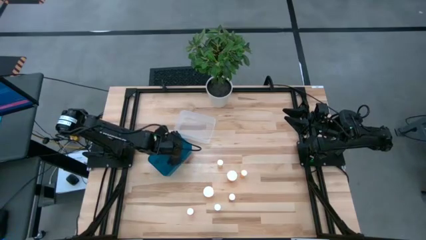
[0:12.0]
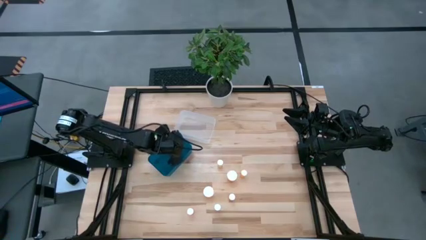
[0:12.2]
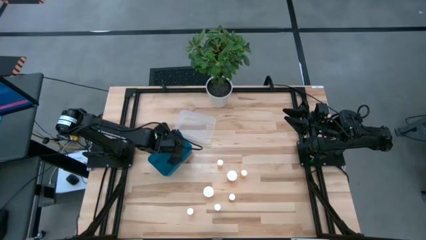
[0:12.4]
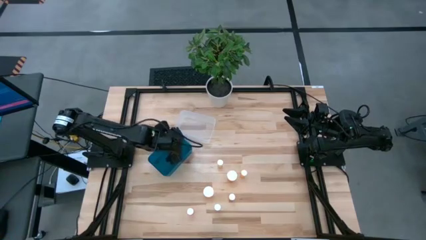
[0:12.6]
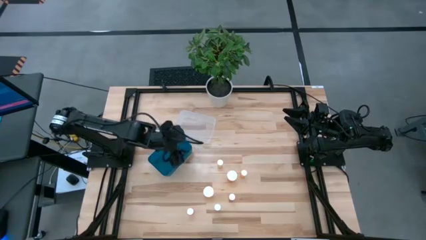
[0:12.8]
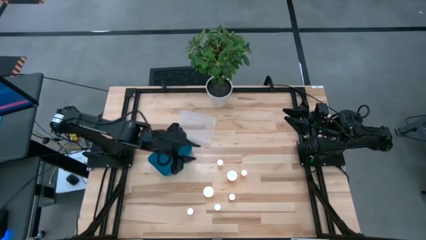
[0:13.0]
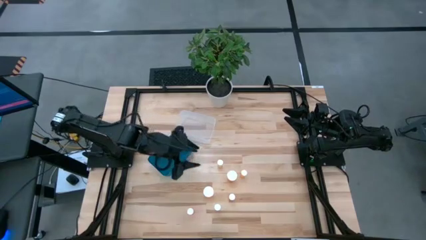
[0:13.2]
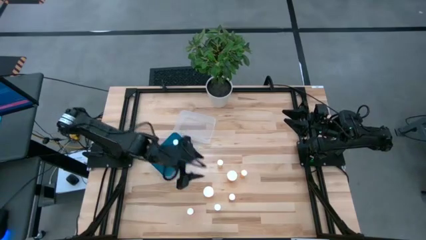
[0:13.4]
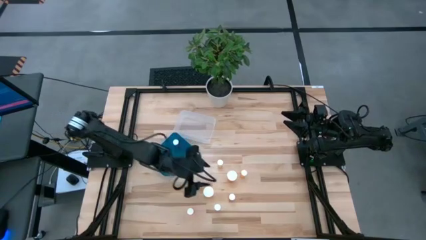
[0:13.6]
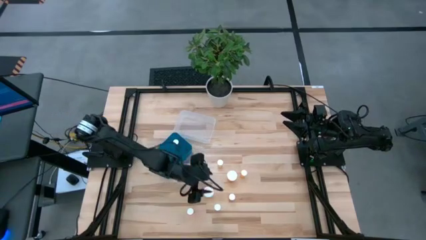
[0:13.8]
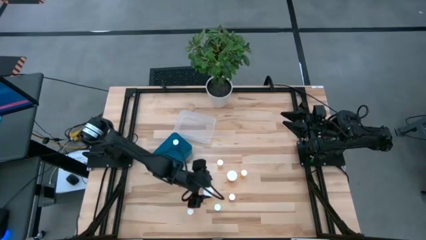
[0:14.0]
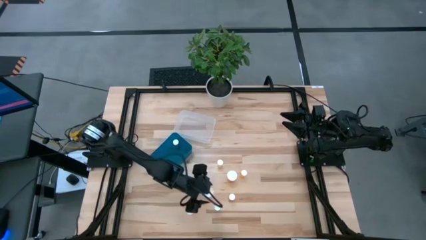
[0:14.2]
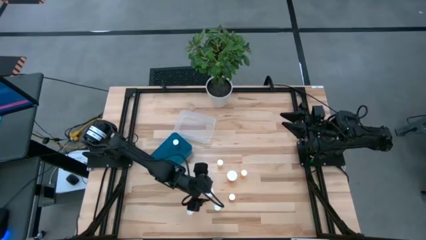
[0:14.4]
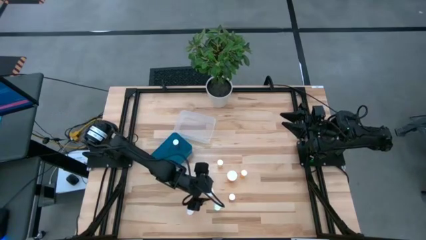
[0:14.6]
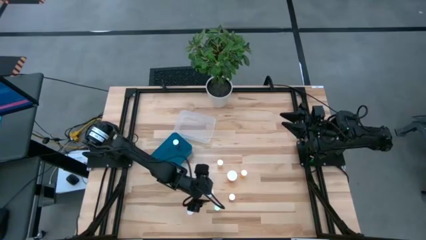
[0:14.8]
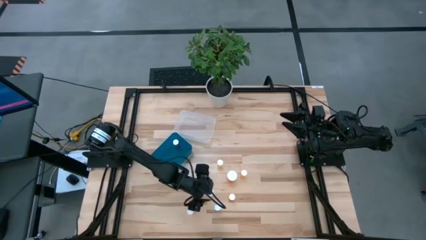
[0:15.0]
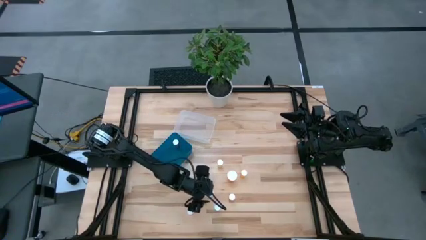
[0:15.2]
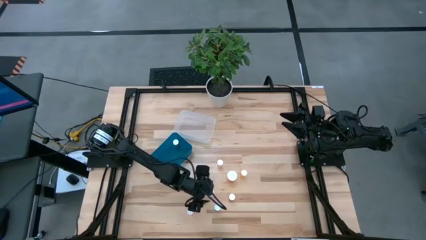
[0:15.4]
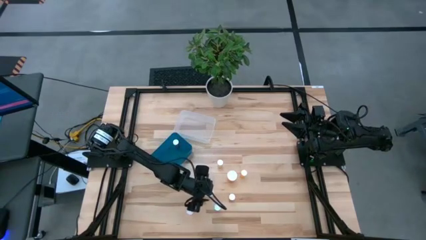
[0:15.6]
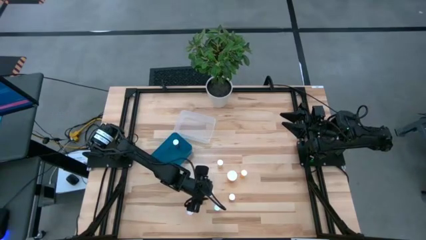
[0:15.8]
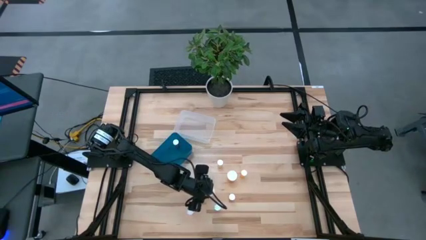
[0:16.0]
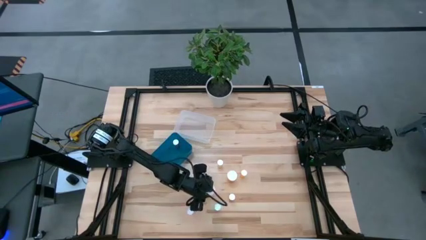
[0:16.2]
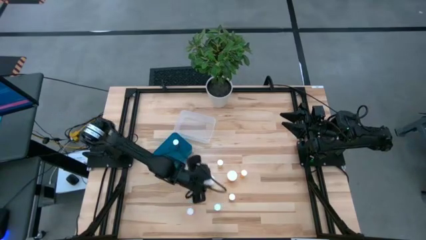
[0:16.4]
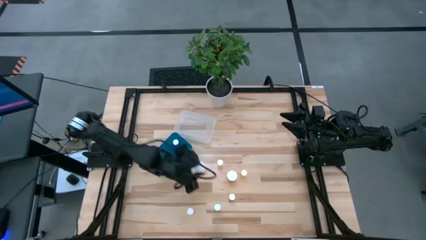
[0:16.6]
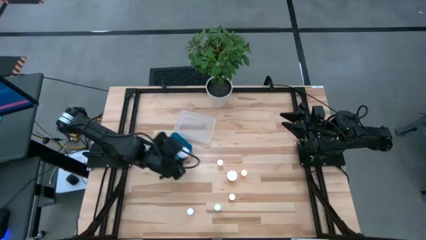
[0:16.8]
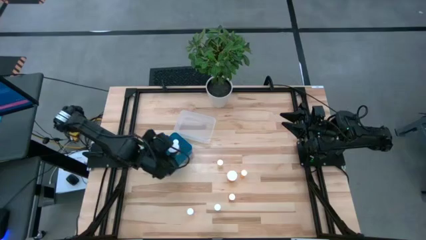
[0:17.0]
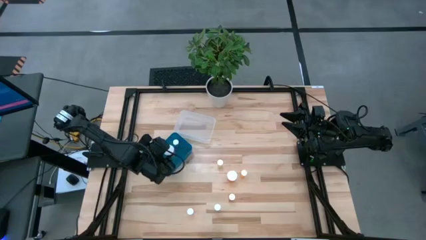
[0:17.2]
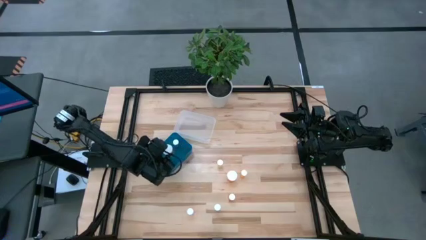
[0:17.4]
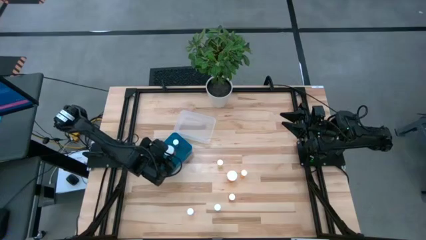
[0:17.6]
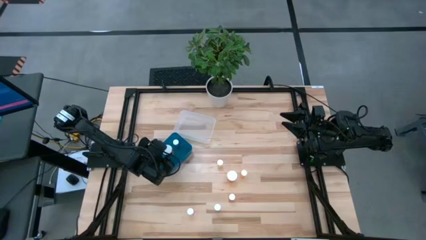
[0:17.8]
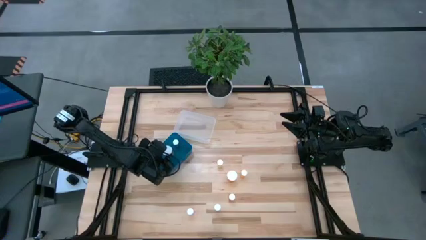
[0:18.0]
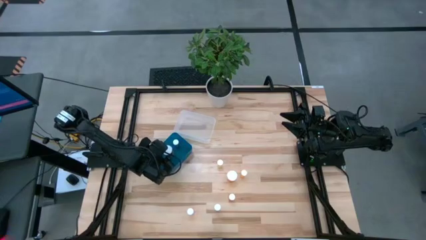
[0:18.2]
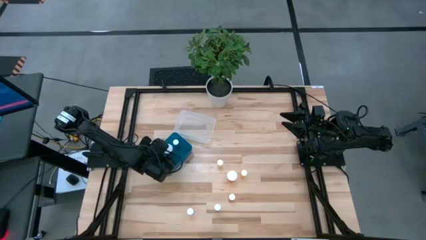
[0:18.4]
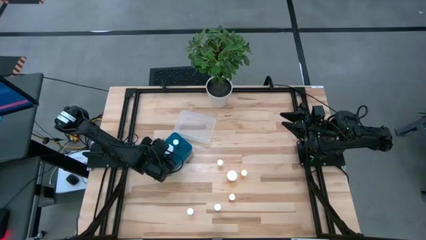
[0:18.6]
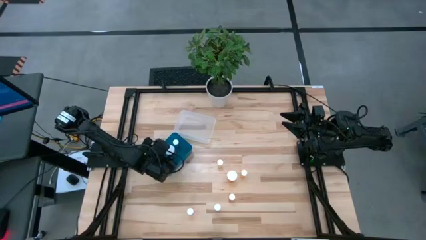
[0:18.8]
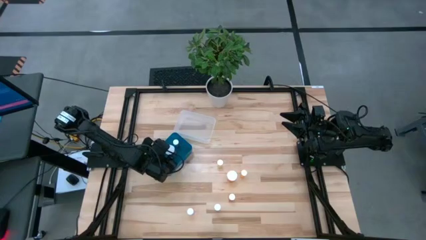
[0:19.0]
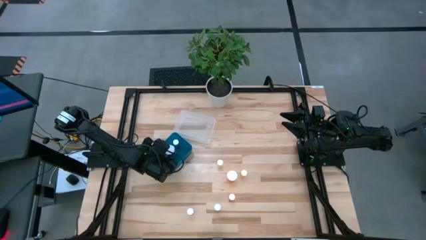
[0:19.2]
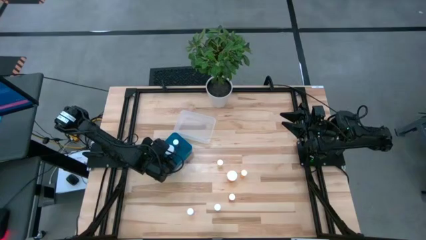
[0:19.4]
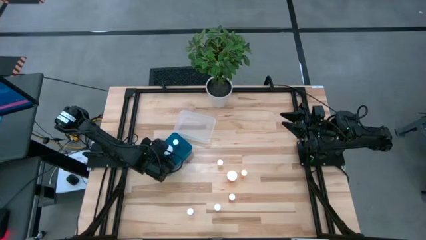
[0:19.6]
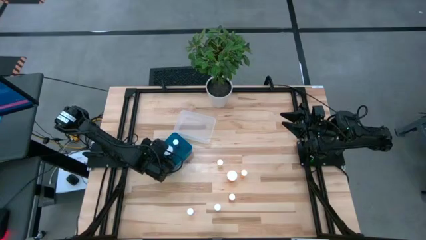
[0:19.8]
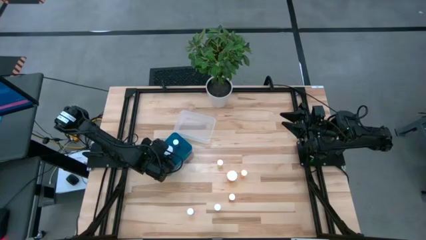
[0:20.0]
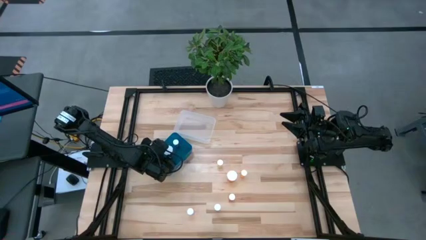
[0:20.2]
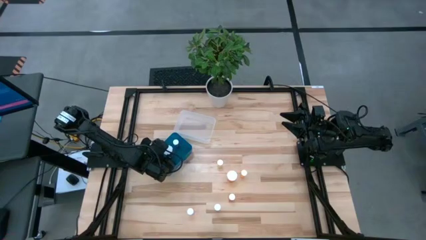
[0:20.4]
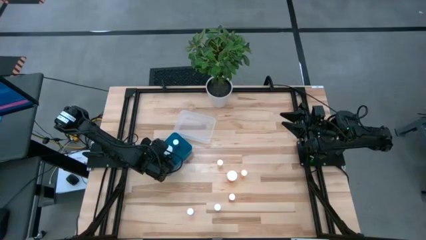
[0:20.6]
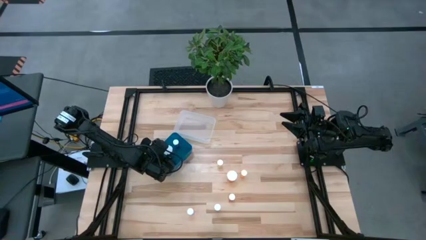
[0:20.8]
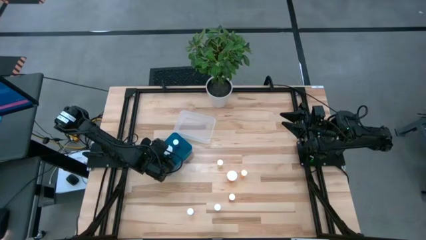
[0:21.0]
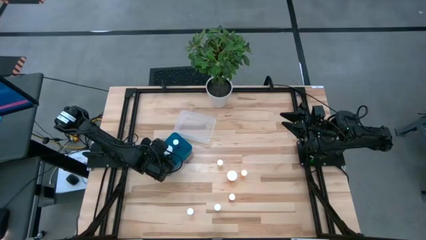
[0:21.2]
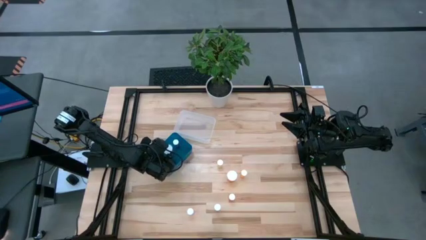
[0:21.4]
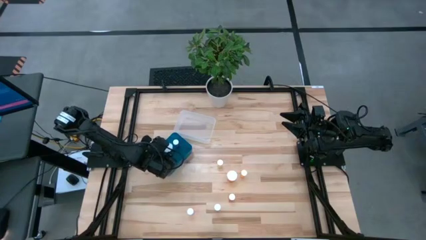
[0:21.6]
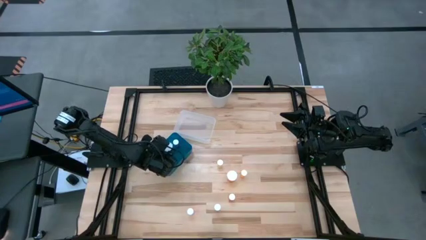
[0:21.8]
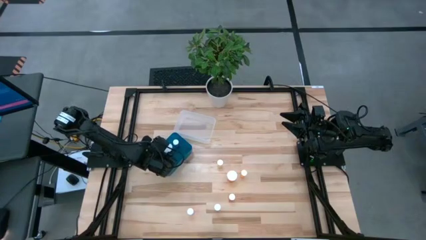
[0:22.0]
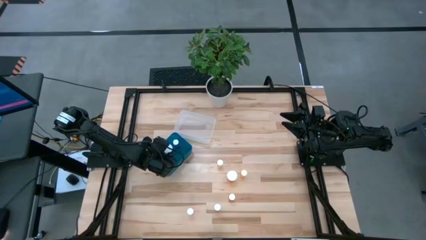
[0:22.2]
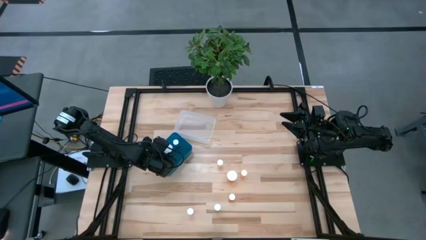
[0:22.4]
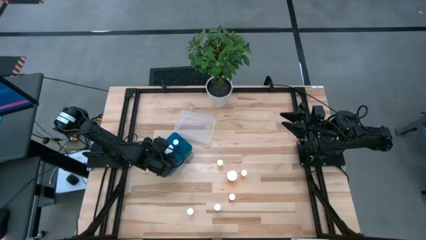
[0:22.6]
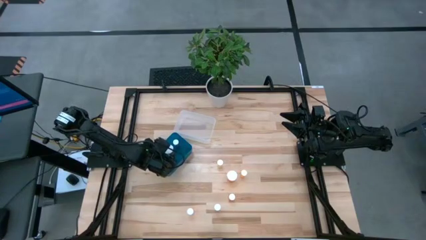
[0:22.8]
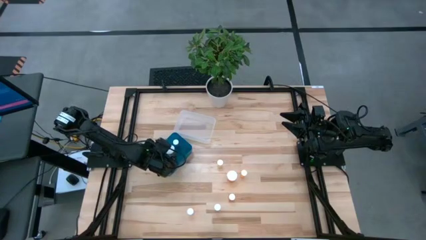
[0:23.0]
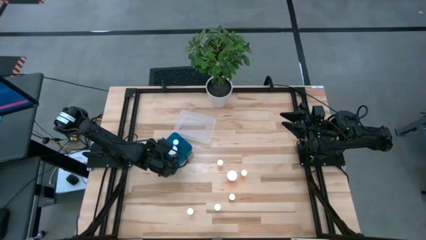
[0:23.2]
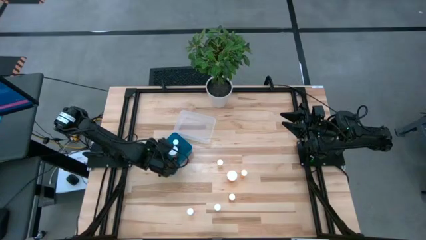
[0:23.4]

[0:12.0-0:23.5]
Task: Pick and place medicine bottles into bin by pill shape (circle, oval)
Put the orange pill bottle into the blue bin

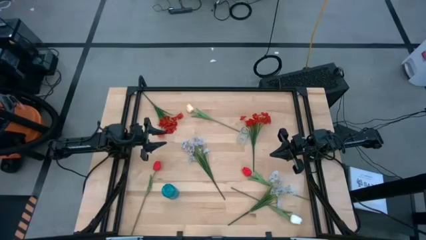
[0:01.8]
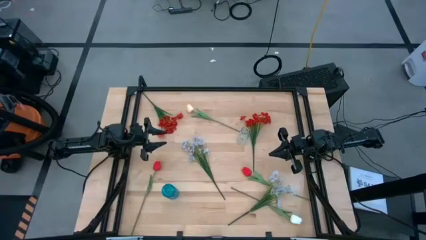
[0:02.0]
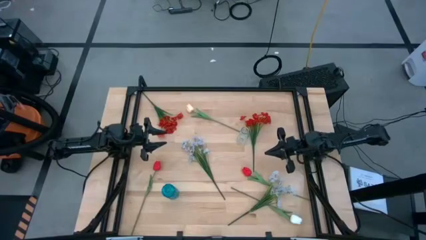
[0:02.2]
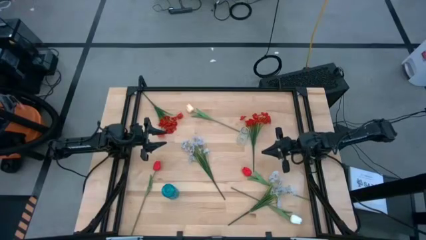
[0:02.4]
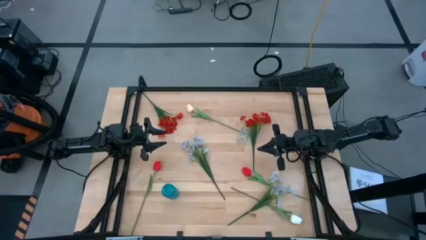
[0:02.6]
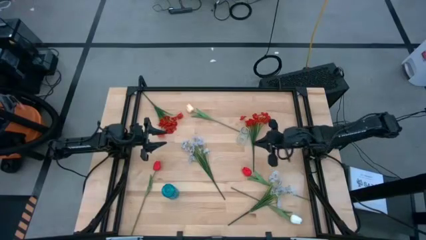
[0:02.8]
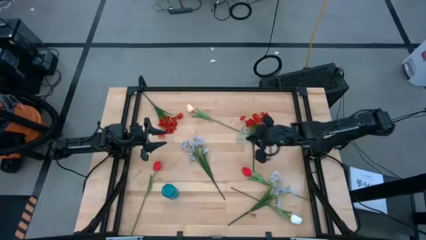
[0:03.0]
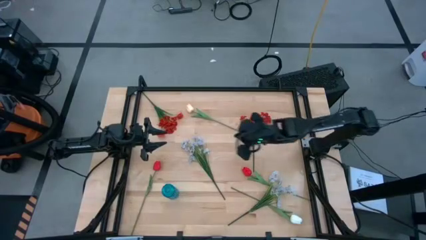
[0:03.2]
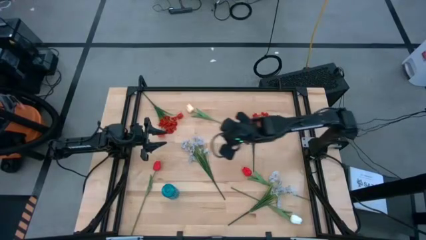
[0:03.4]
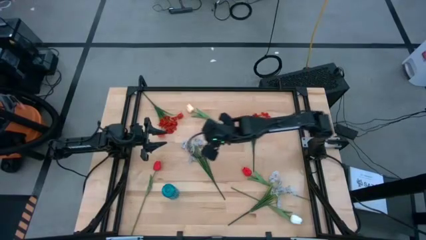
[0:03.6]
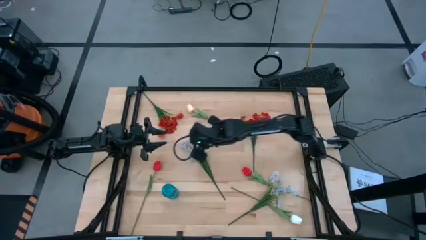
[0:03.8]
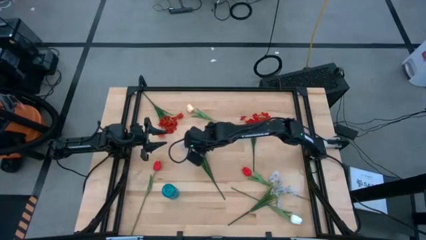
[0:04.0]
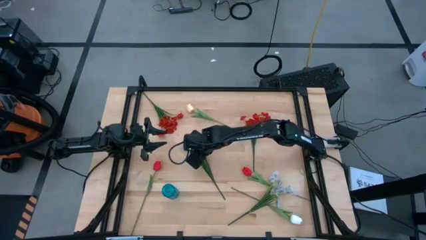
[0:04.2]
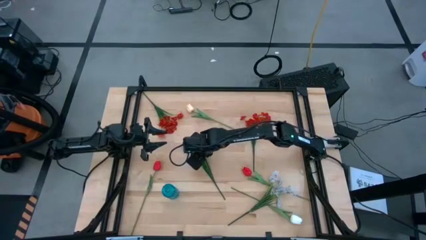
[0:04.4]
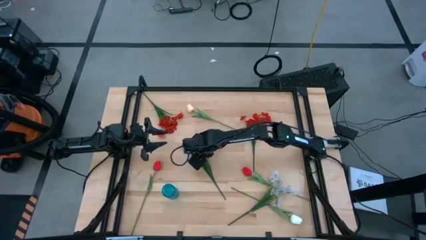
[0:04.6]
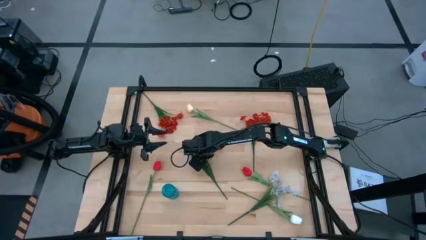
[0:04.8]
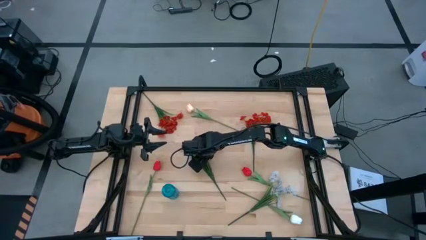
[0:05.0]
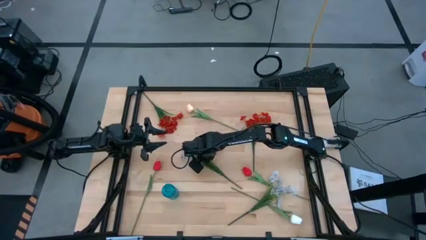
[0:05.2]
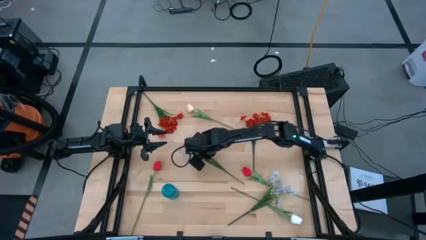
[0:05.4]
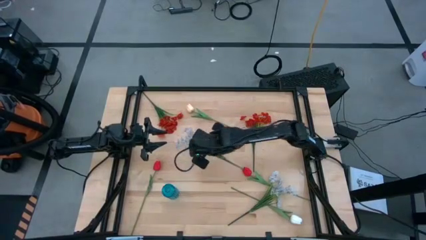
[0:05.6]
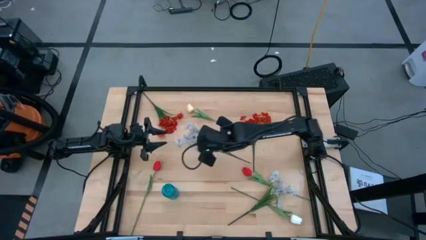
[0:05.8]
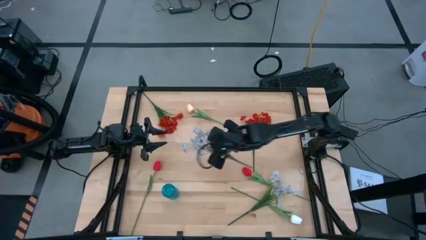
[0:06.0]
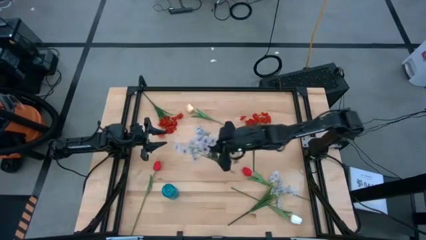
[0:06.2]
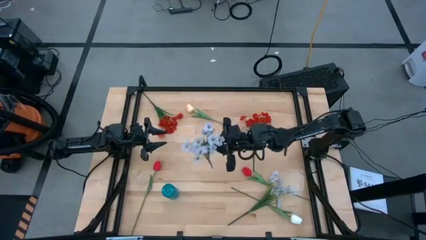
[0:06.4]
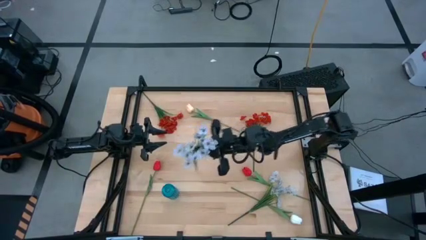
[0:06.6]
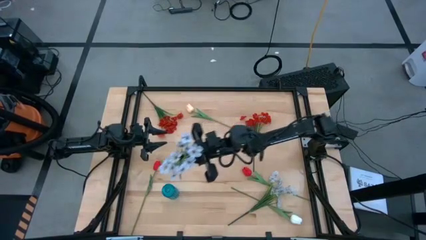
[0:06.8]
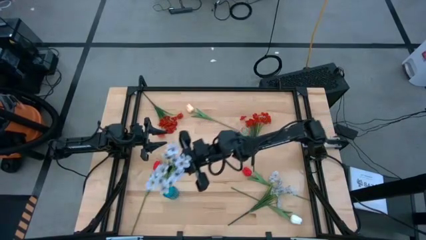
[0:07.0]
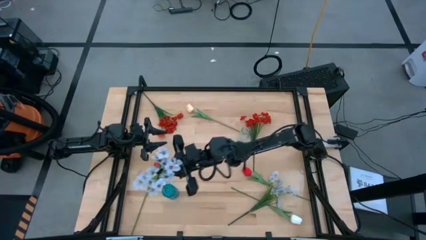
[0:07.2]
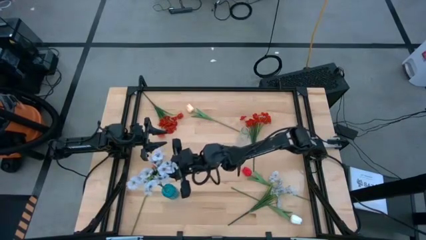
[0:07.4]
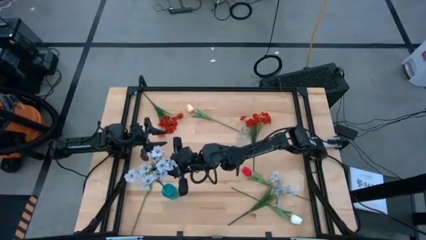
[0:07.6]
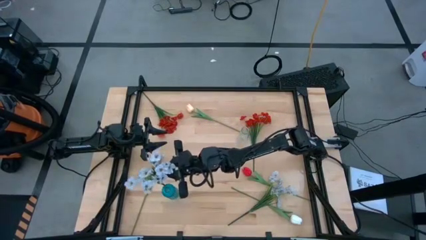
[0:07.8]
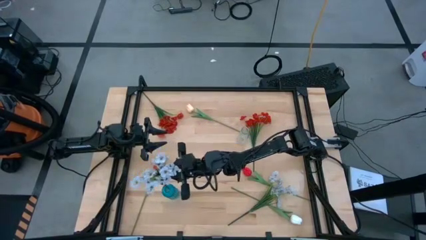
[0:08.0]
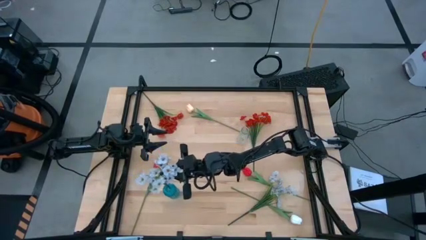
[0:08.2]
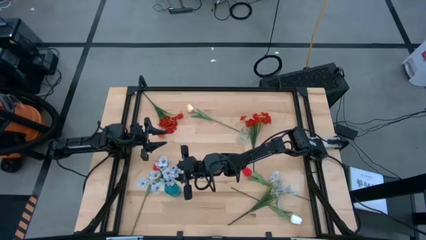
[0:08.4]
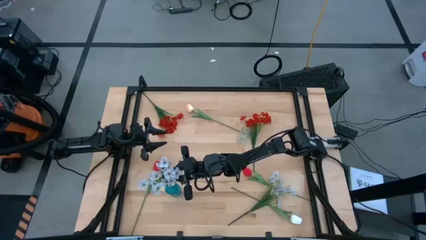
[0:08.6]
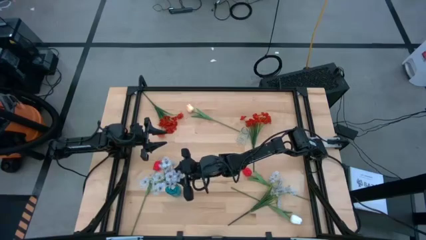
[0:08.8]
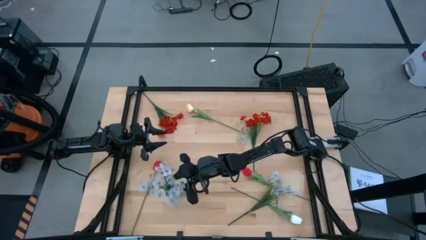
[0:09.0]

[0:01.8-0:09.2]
Task: Sort flowers into vase by color
Put the left white flowers into the blue flower vase
